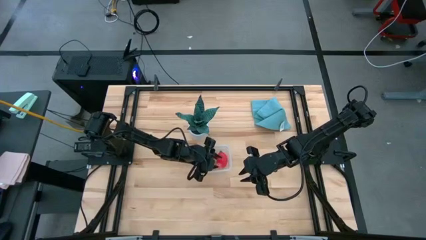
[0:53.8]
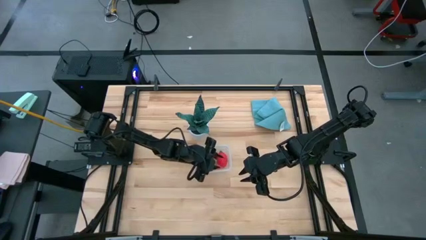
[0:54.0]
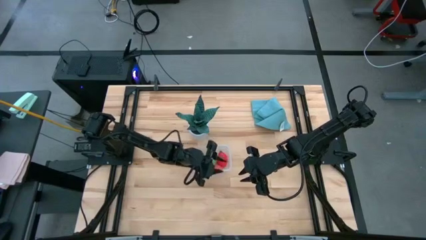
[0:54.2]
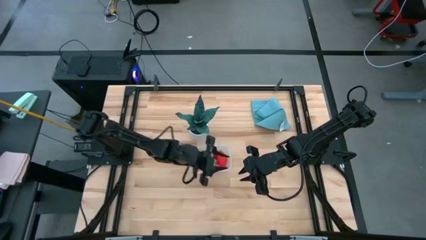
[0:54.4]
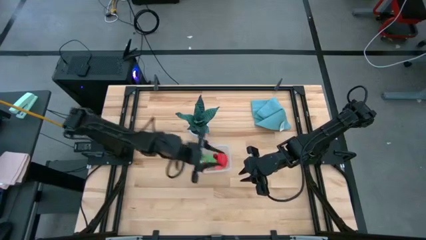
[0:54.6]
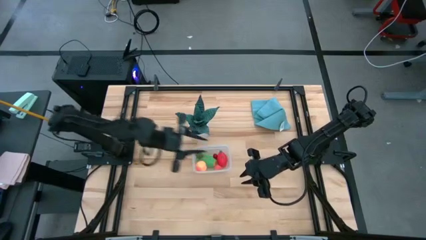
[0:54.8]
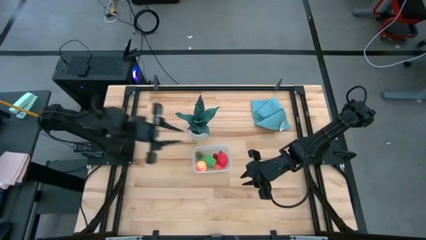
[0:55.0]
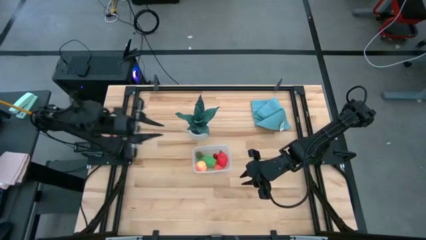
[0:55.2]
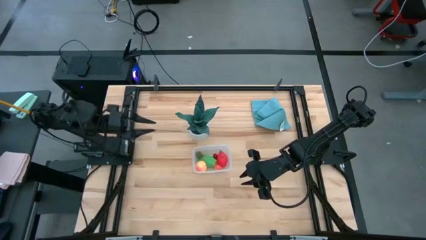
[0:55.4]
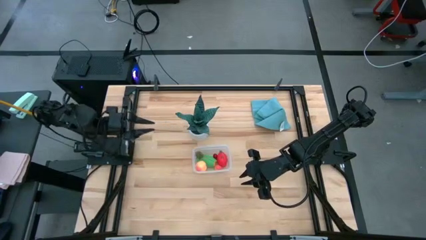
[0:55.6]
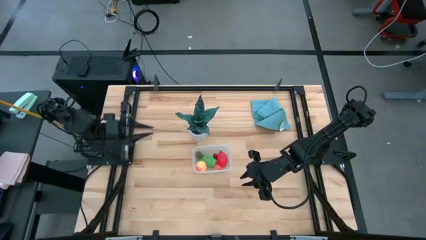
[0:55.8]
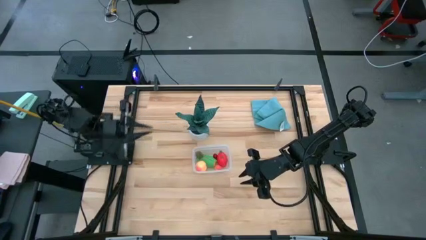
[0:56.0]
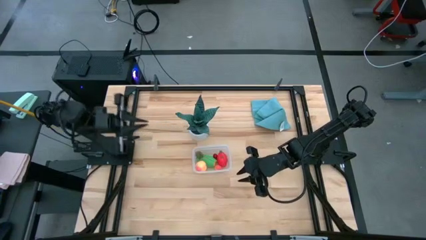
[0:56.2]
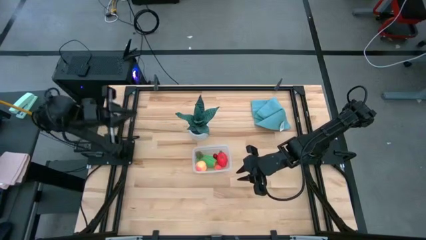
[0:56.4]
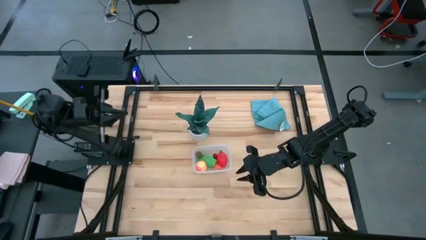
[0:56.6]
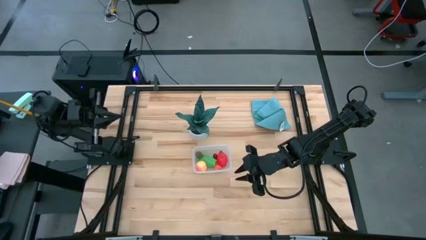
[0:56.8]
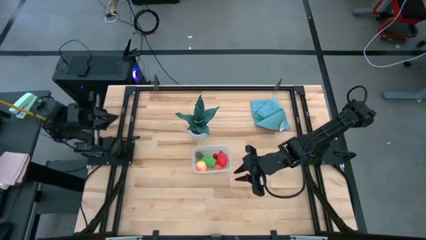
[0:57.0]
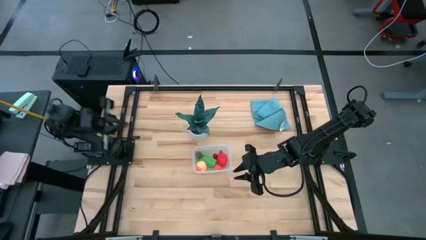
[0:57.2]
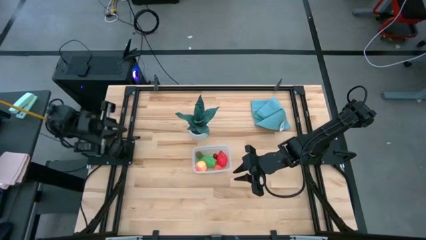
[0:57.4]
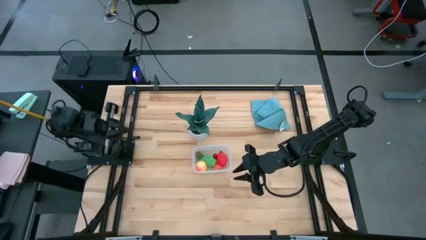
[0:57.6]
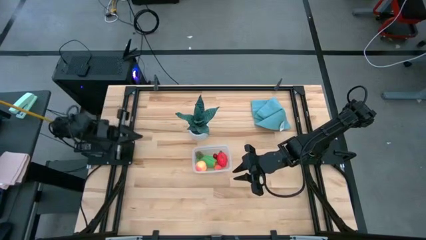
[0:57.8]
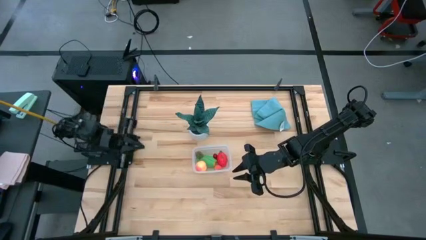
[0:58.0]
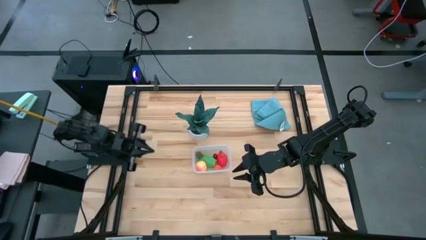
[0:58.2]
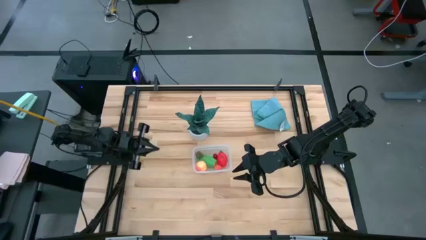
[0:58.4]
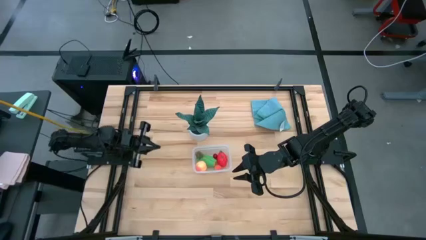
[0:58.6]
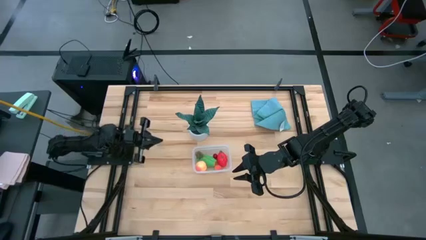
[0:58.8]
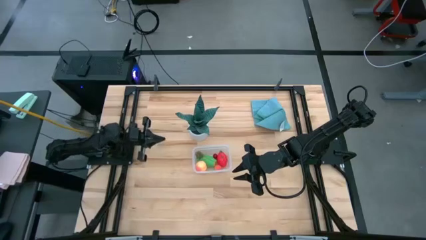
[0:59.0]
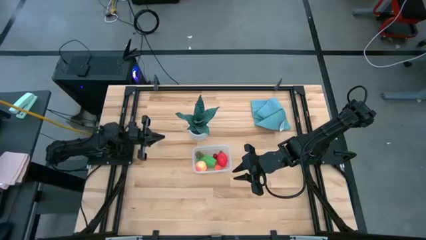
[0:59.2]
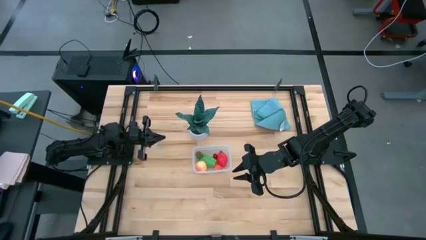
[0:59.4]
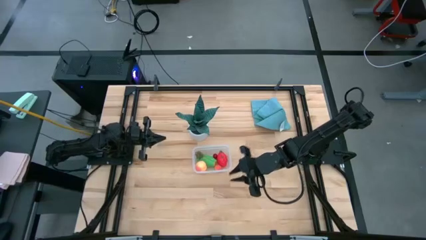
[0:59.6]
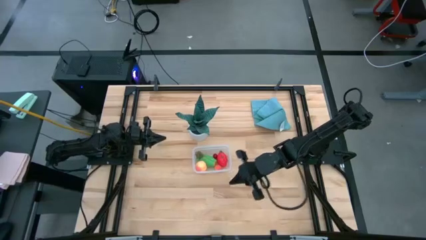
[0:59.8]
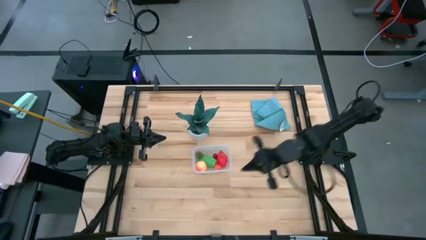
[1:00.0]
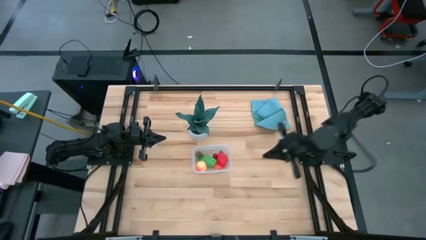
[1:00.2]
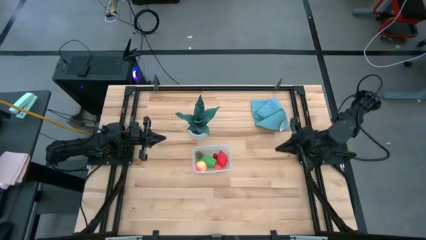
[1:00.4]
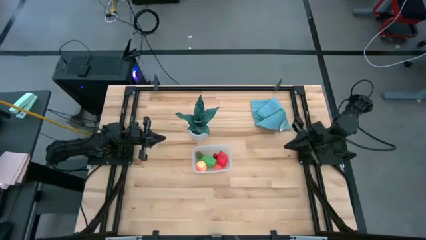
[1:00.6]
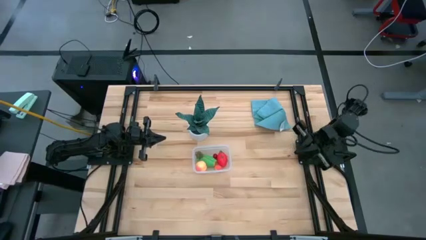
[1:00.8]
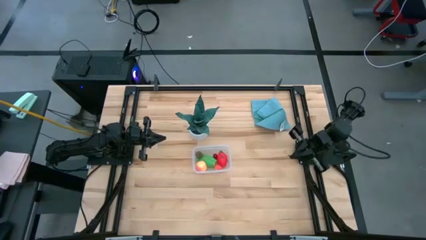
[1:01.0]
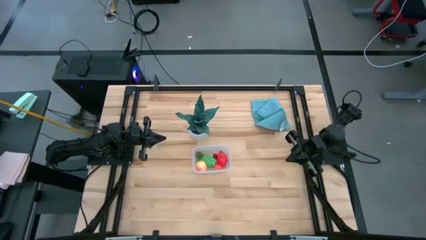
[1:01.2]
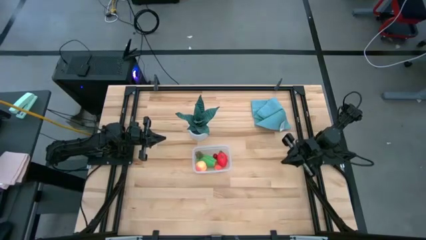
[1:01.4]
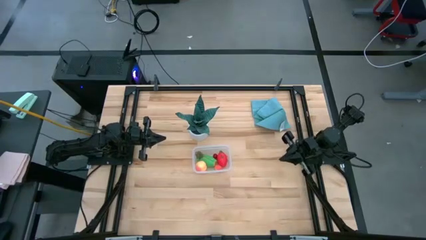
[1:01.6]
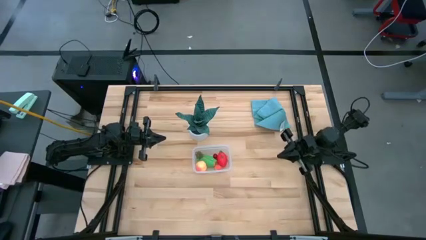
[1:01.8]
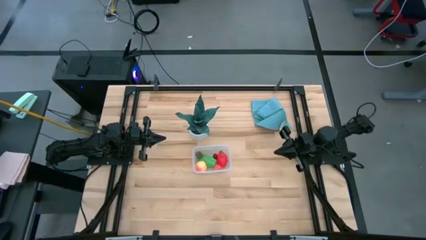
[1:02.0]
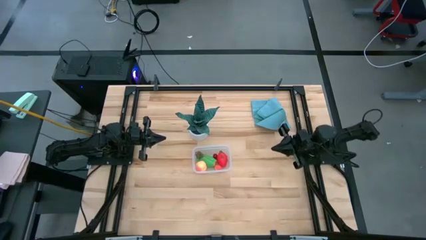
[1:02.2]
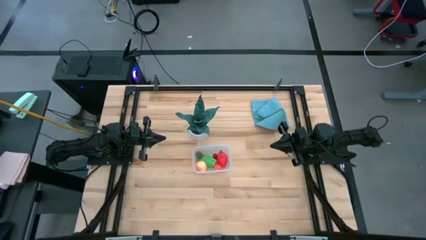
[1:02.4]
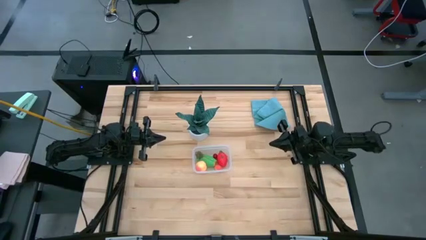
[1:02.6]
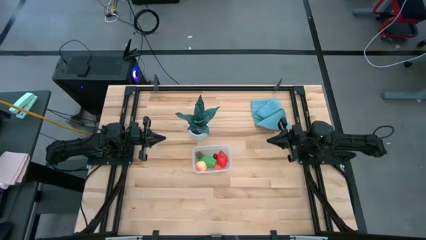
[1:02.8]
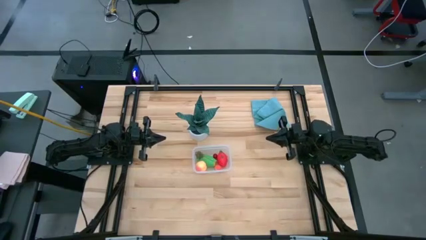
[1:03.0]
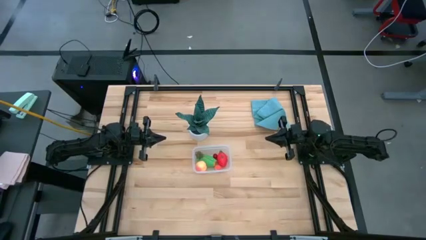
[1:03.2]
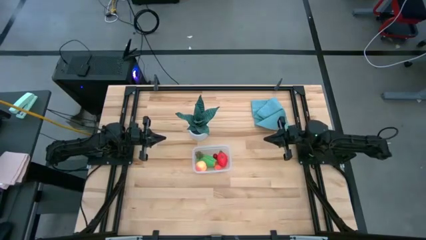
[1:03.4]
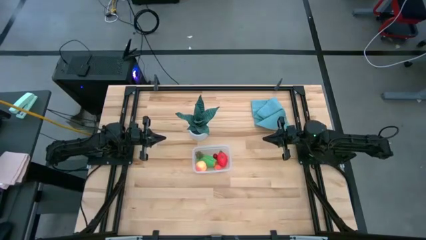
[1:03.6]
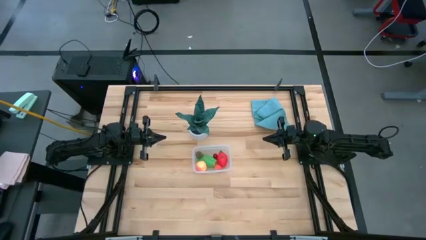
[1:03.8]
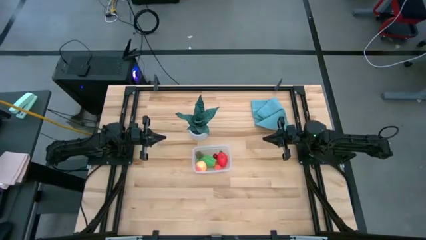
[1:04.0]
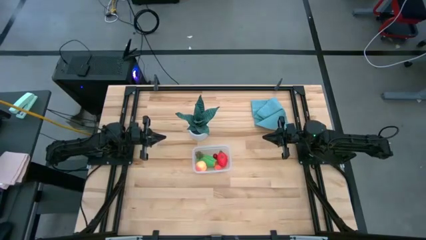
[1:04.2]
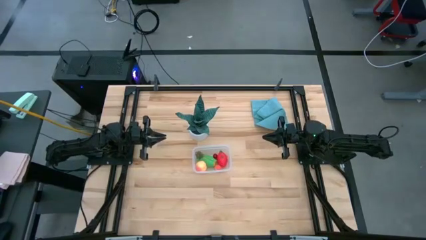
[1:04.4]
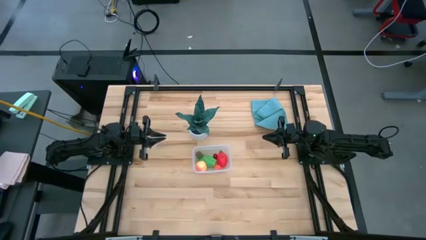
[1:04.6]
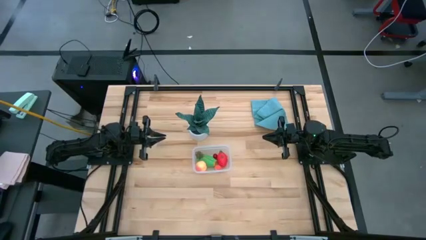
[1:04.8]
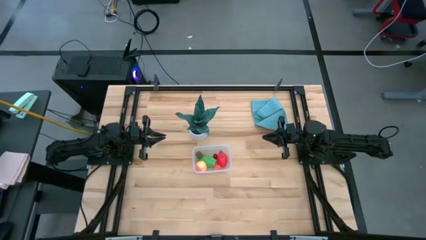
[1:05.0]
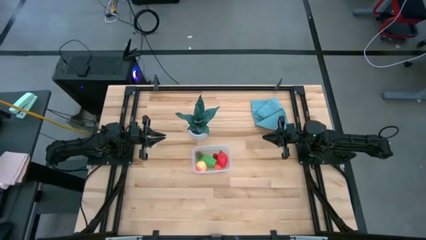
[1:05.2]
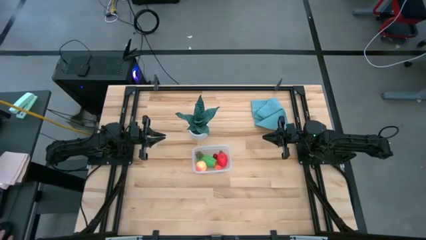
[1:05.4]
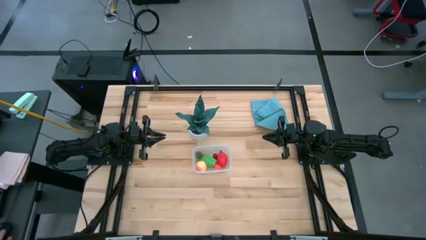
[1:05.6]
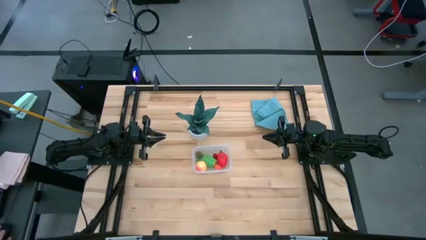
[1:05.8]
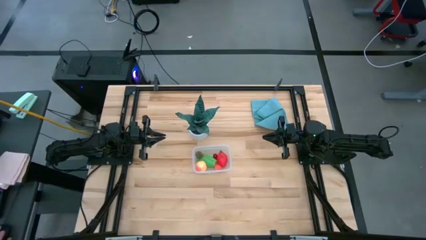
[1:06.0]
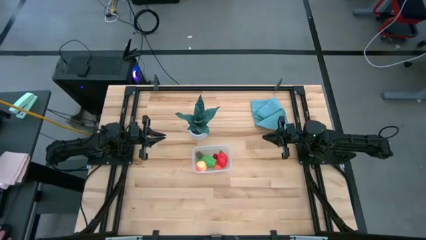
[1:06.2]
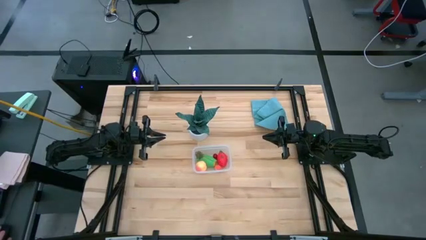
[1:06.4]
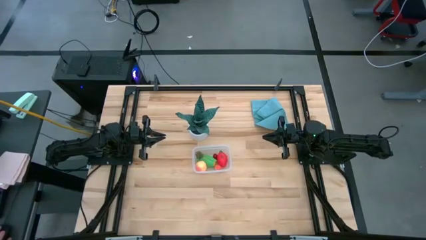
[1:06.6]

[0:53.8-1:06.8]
Task: Pick and placing Produce into tupperware
Return to Home Position

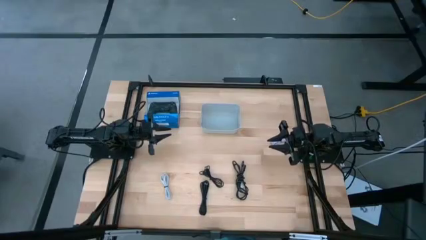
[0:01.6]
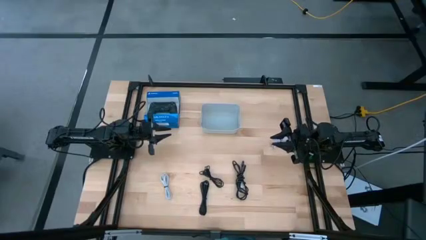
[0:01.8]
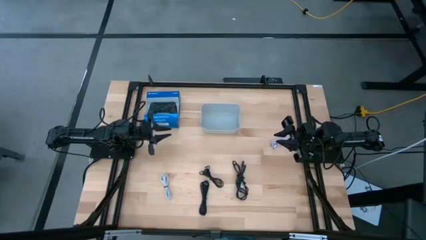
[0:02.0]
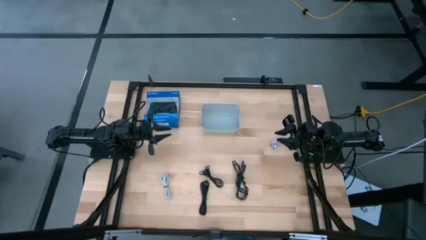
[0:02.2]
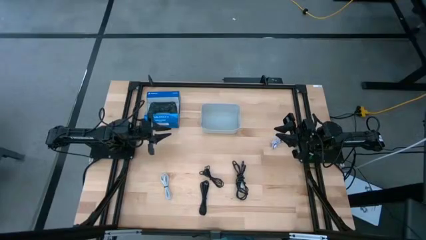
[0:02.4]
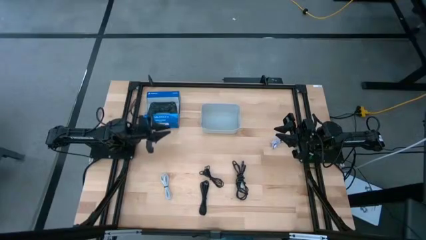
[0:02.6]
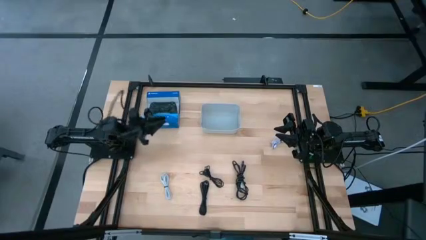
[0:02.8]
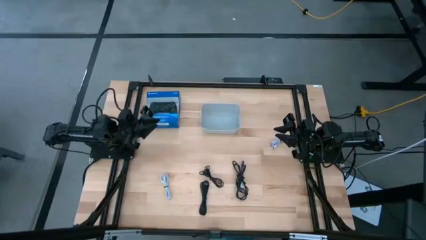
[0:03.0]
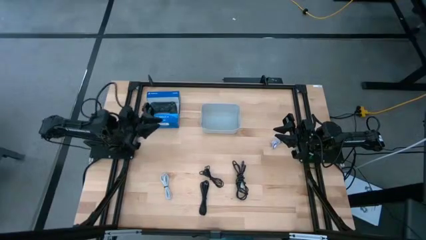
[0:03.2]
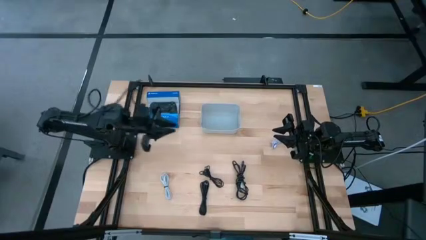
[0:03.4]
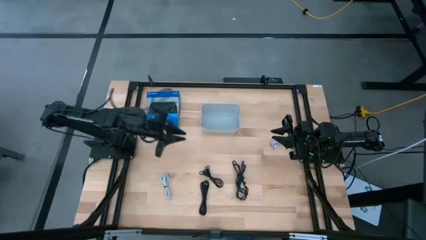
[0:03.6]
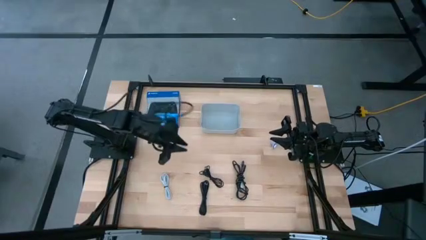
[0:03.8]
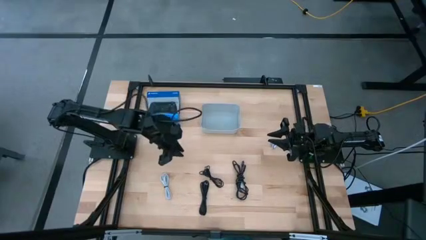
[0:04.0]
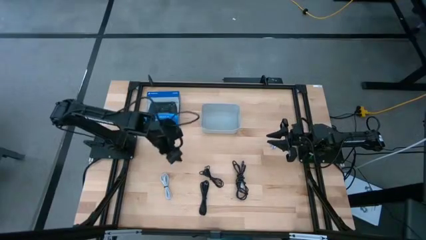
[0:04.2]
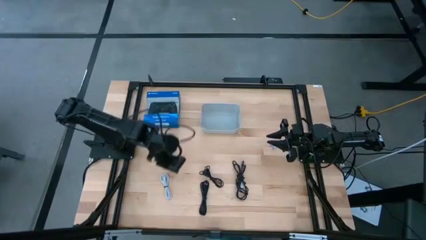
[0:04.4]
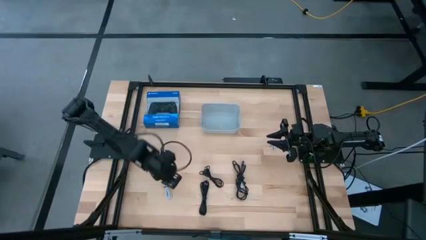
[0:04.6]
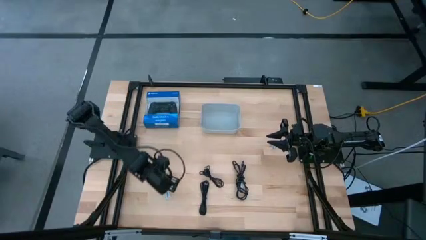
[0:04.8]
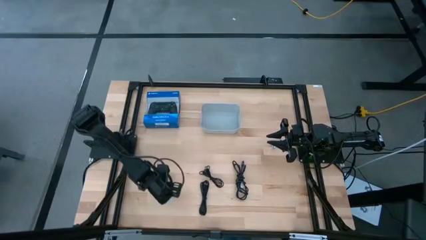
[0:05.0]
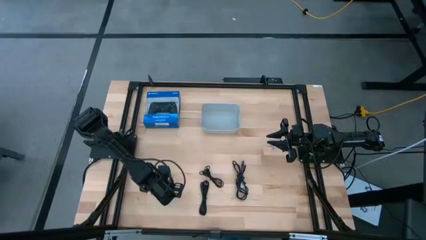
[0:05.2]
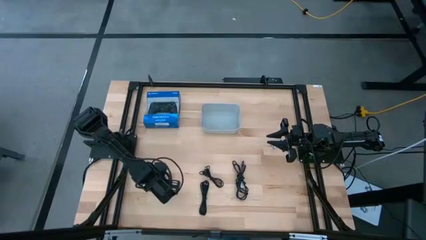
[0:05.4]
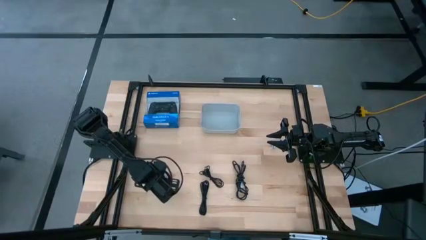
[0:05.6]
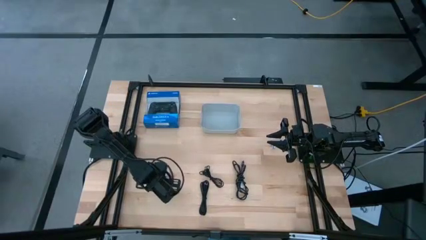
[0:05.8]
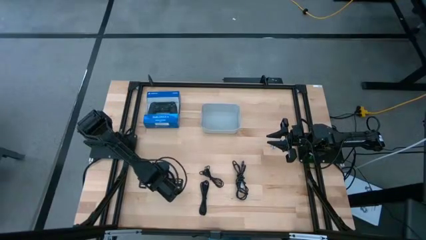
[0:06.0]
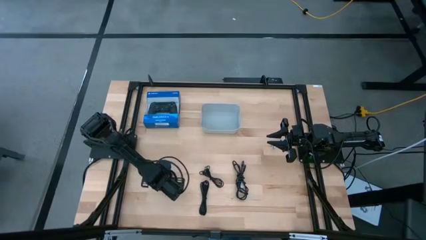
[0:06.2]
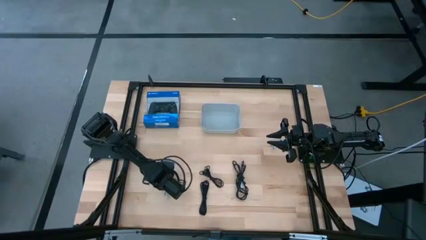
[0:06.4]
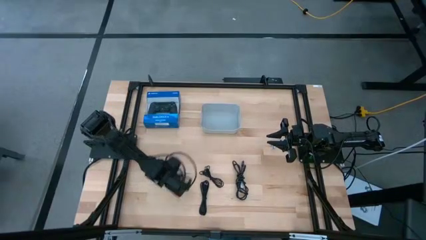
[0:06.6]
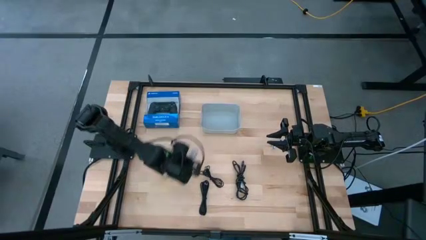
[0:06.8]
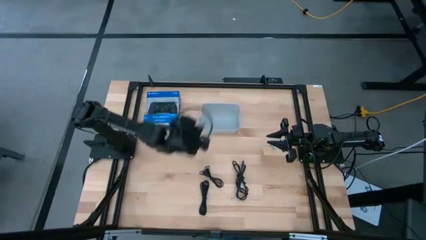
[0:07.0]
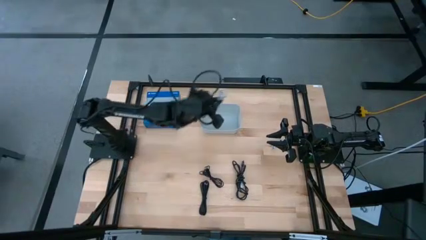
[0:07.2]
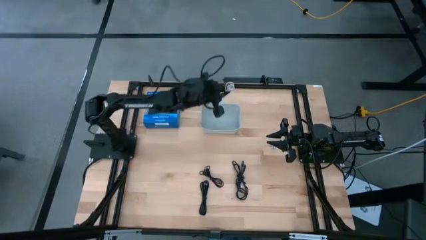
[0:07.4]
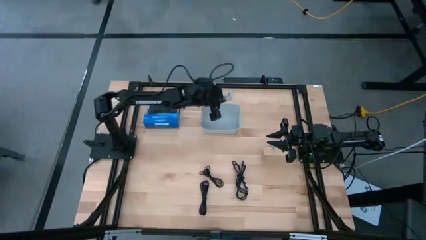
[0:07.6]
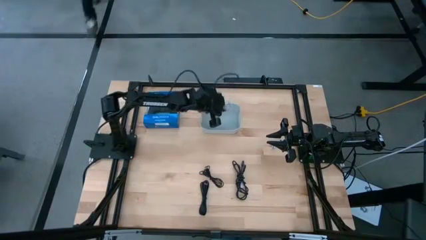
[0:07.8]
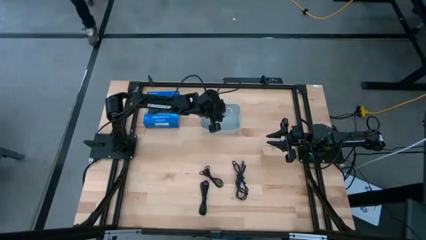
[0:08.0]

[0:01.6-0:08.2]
Task: Pick and place USB-C Cables
Put the white charger cable into the white bin
